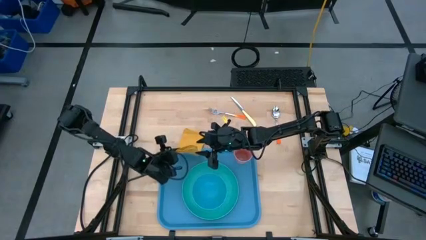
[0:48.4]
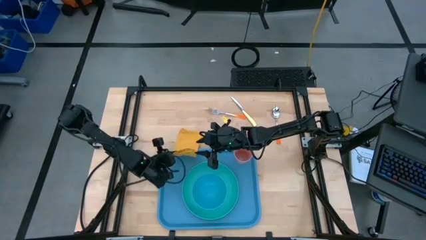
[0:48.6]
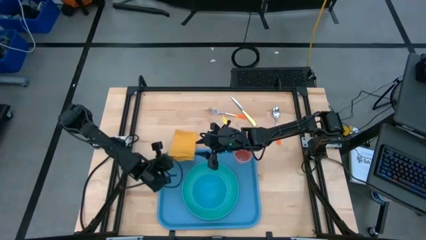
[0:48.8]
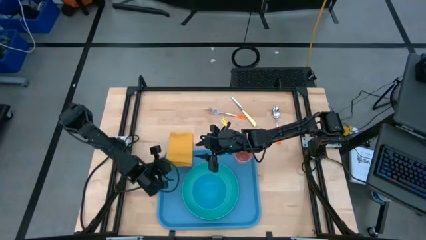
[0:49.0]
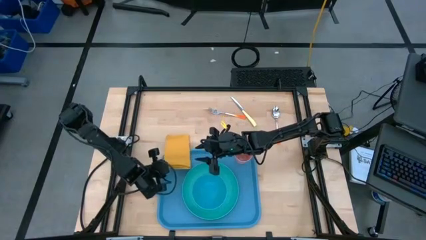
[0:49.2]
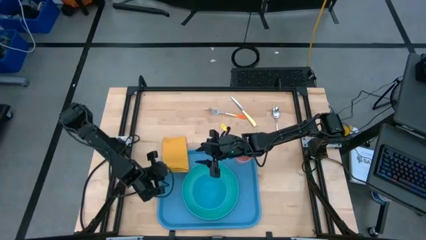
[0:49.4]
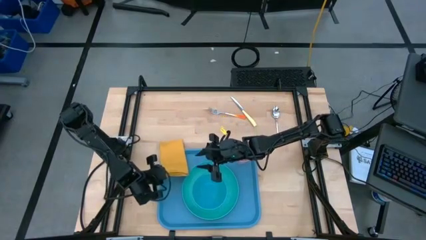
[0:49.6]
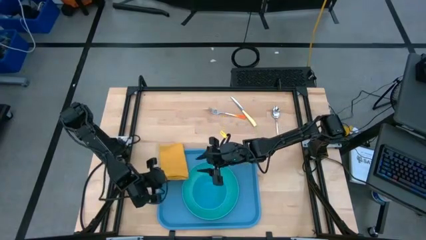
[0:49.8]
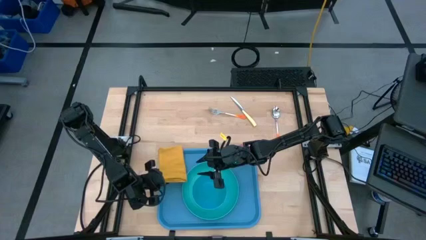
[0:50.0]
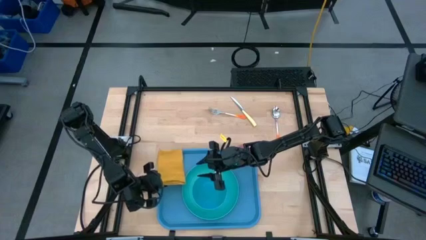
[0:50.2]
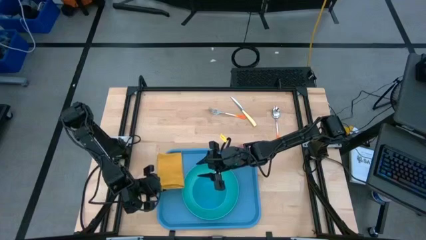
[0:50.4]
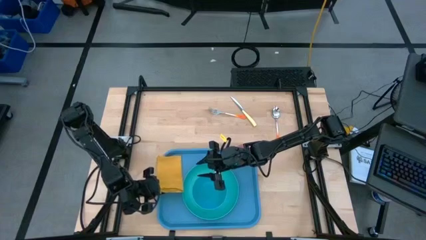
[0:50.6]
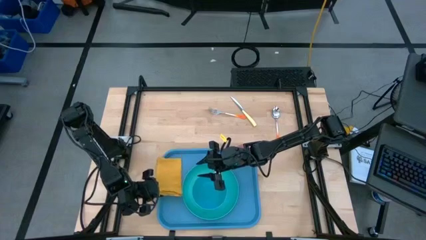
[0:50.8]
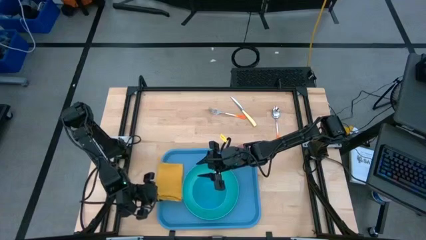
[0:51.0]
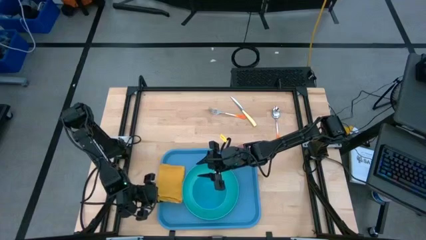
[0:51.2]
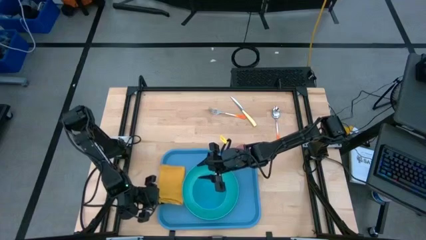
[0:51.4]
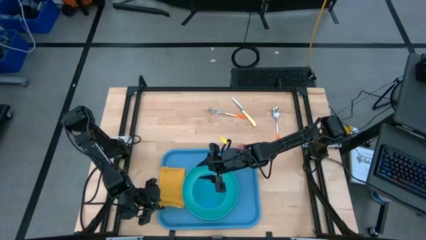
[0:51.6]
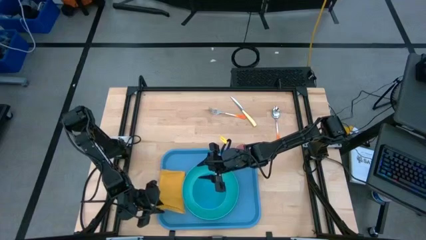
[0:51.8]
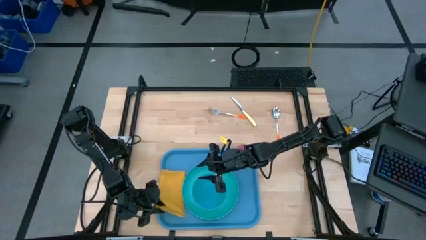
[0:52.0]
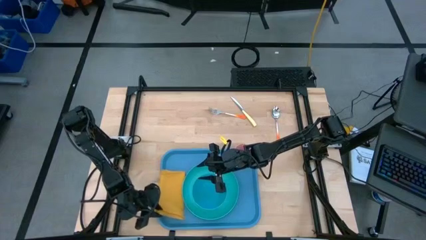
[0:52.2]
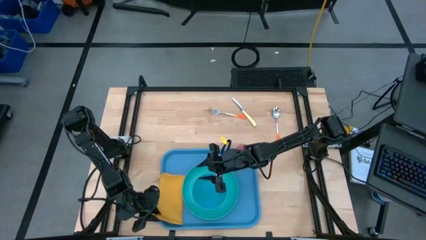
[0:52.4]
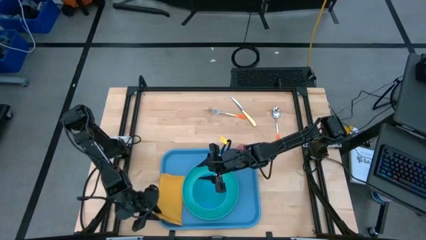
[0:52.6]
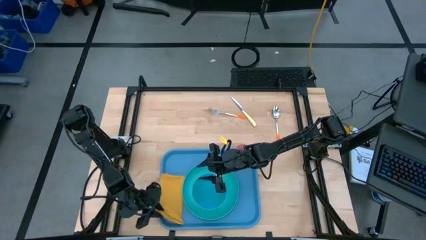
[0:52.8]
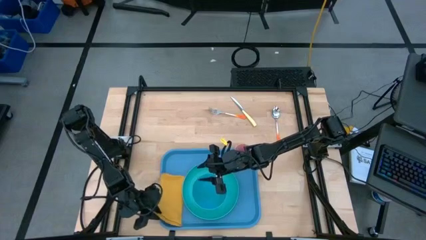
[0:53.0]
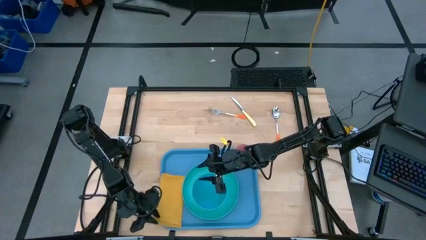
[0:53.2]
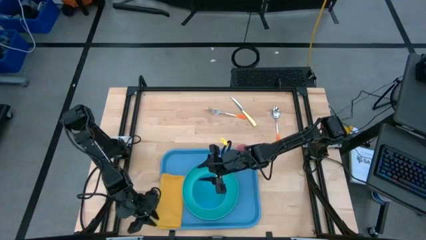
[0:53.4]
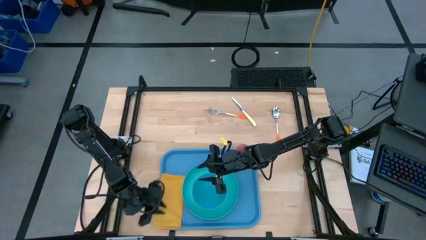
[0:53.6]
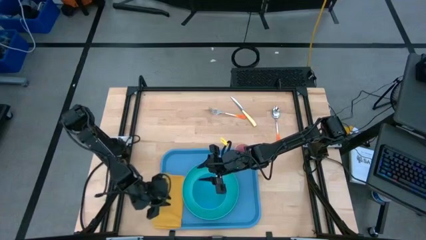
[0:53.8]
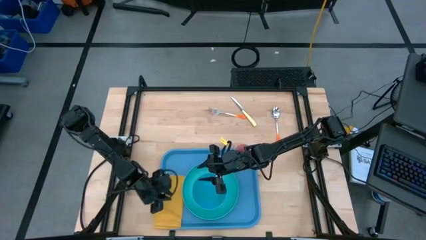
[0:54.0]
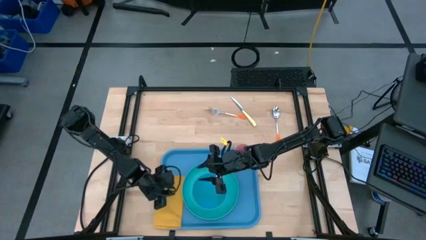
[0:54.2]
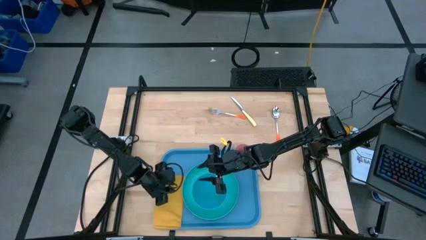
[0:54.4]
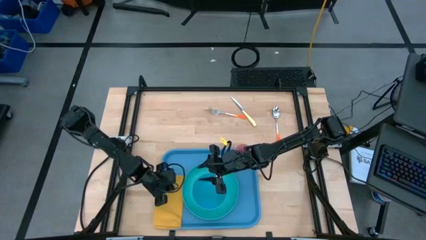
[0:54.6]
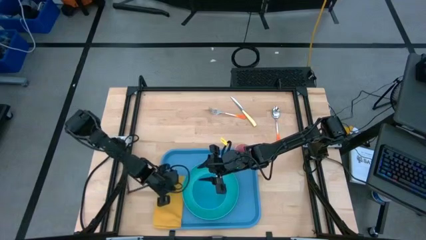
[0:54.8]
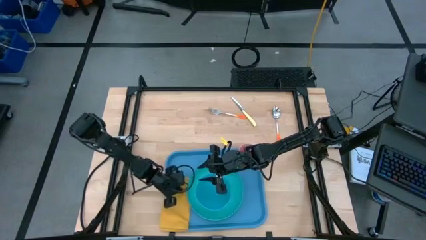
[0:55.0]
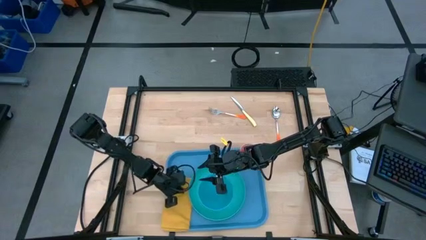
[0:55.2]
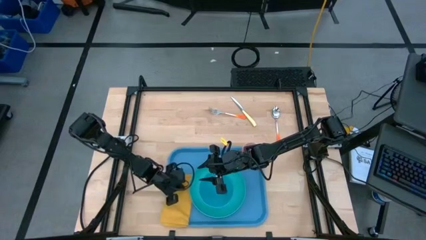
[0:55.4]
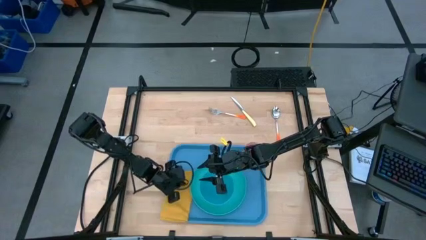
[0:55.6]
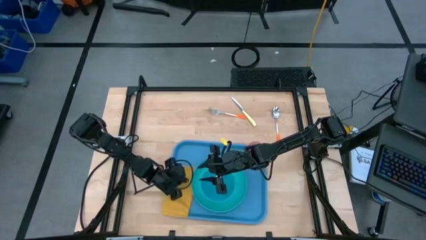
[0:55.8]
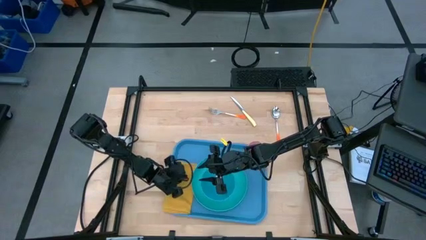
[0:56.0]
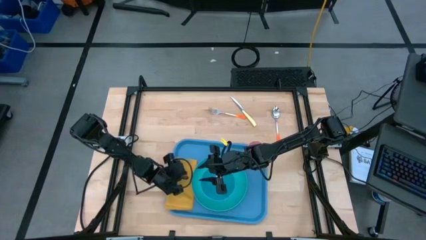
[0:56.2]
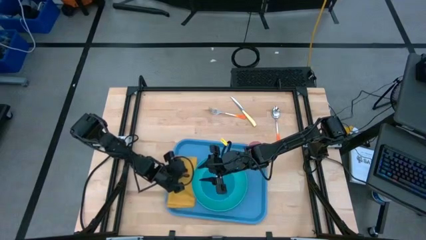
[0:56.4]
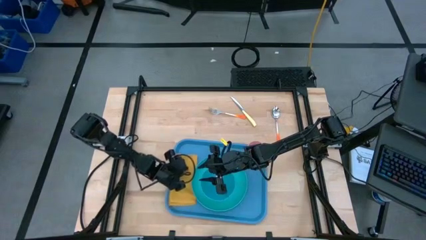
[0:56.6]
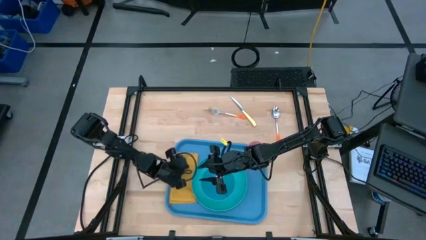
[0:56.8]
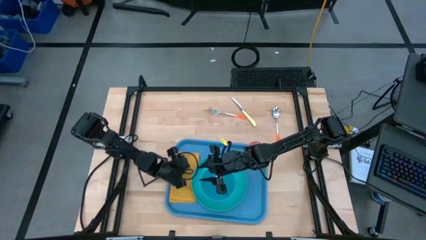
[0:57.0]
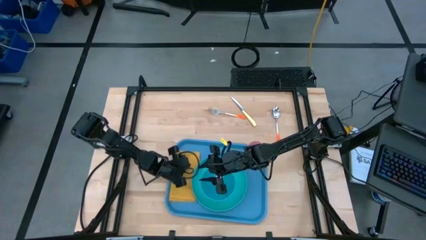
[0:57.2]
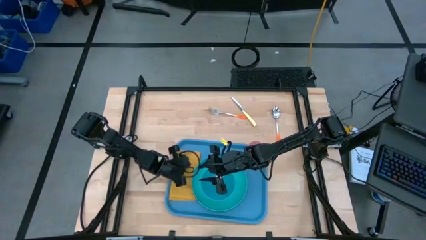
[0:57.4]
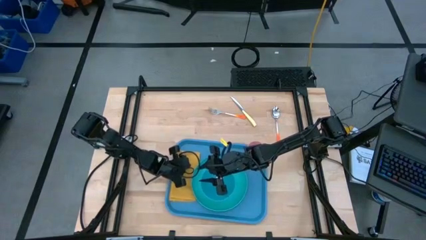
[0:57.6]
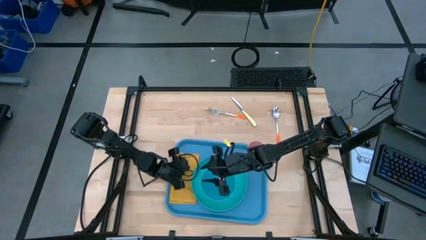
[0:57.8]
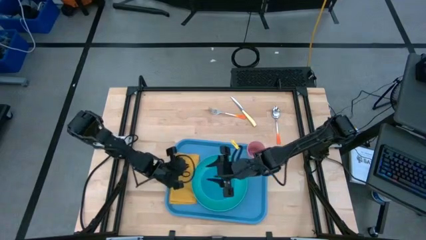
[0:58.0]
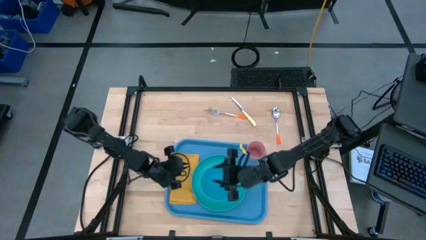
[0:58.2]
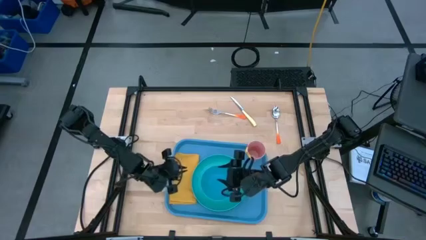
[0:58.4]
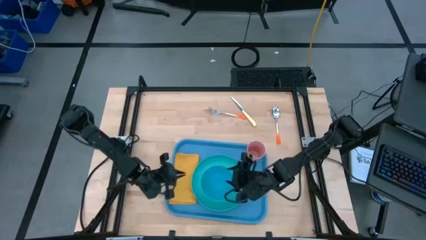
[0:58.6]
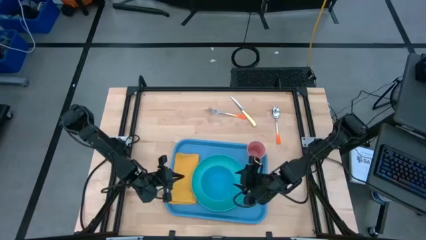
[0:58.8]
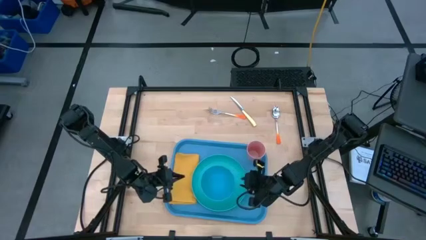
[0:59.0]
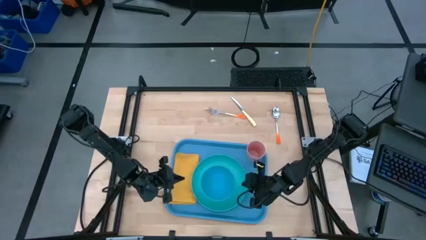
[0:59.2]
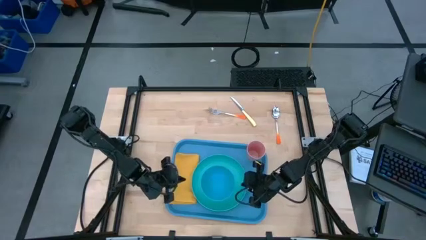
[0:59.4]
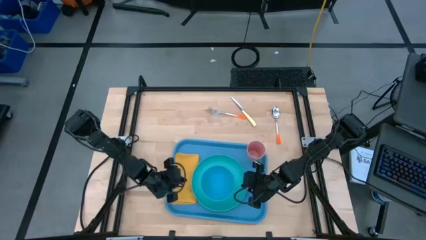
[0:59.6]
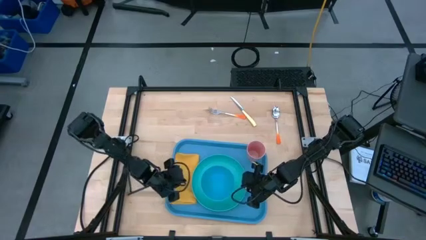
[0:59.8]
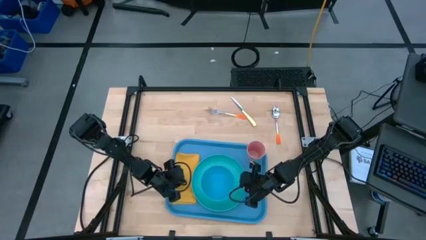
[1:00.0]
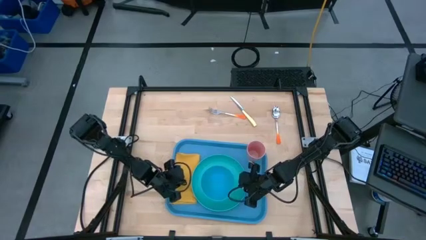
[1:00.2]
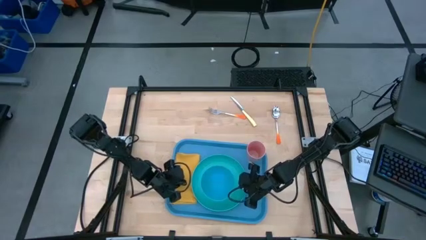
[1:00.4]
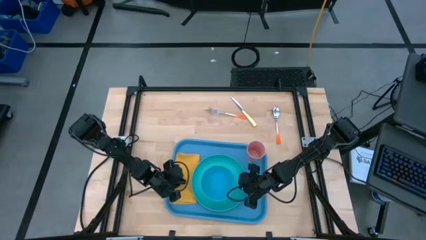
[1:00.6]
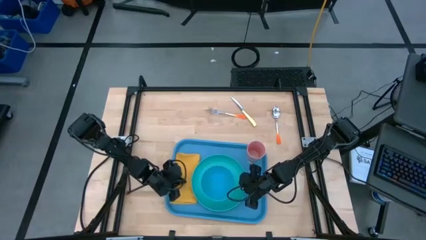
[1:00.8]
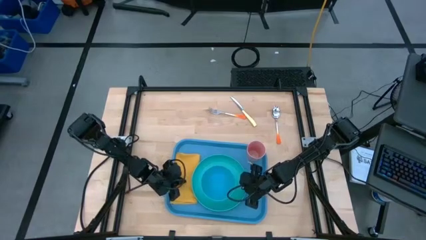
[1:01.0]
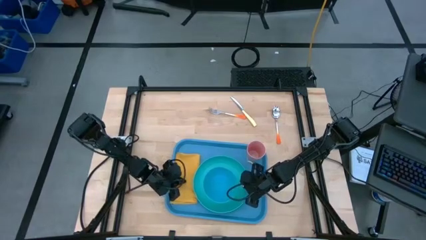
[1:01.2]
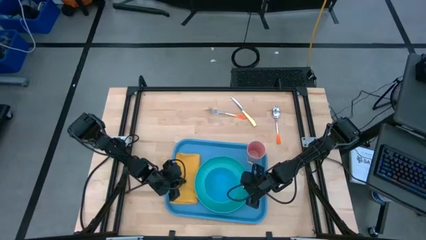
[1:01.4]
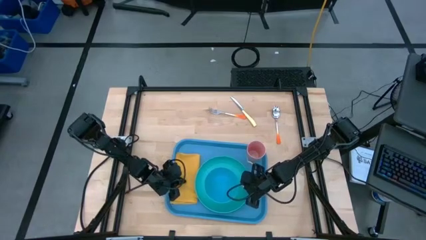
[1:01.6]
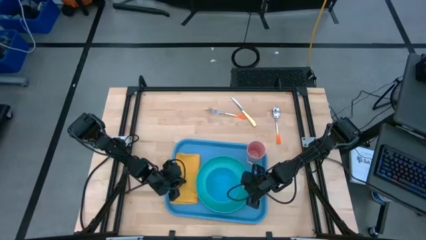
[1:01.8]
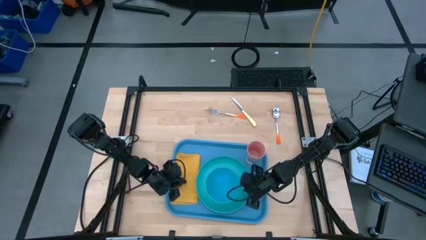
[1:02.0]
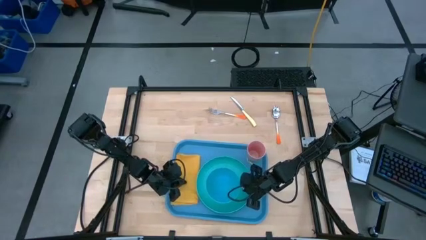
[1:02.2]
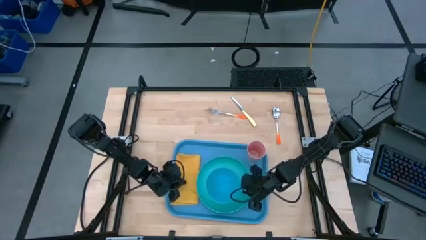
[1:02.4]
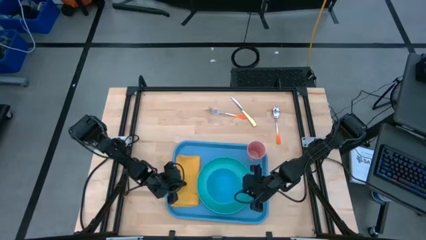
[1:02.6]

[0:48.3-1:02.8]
Task: Set up tray
Put the yellow table napkin on the blue tray to the left of the green plate
